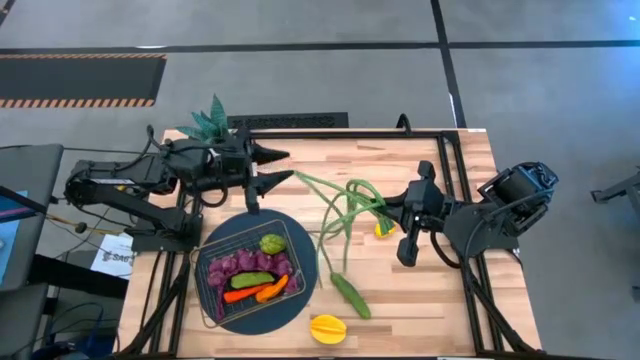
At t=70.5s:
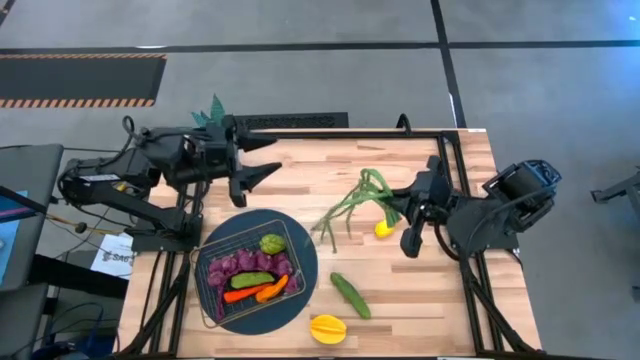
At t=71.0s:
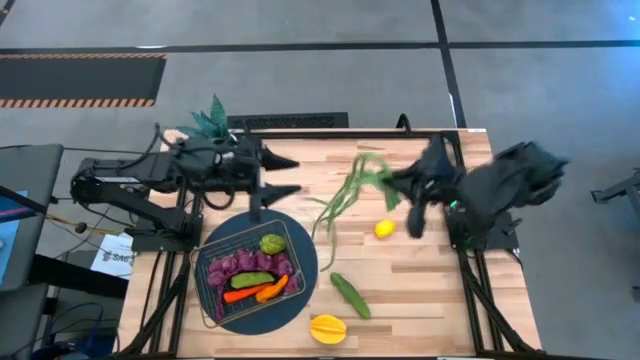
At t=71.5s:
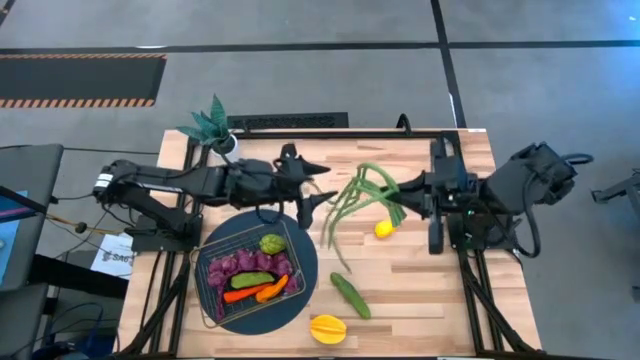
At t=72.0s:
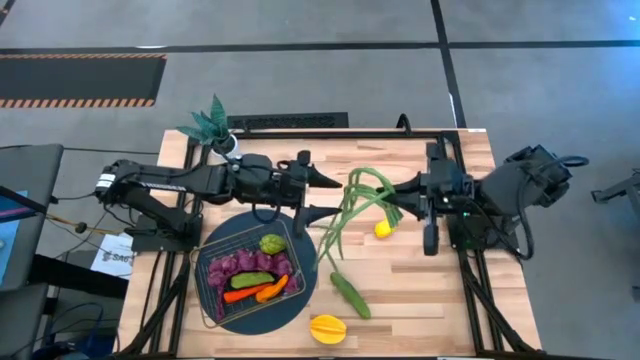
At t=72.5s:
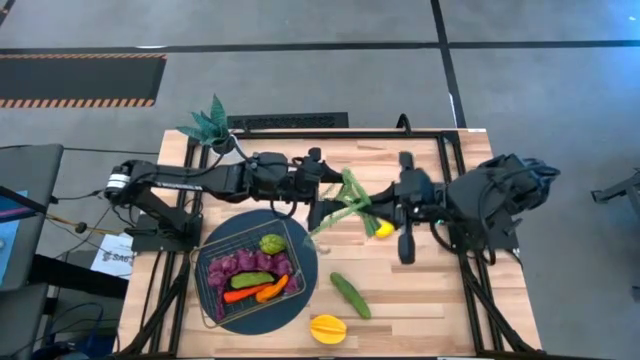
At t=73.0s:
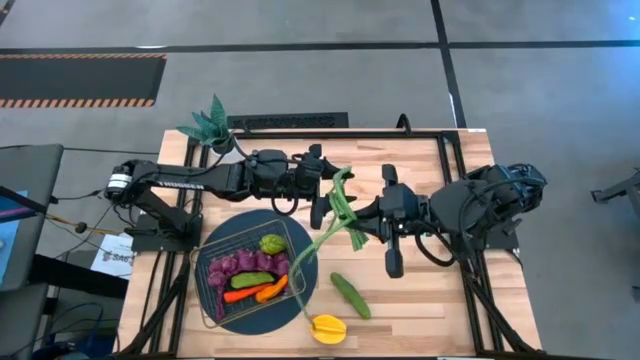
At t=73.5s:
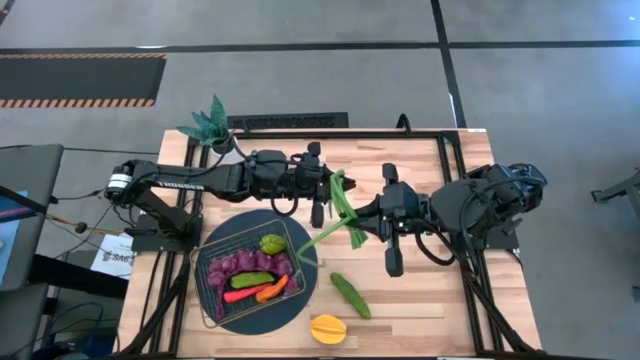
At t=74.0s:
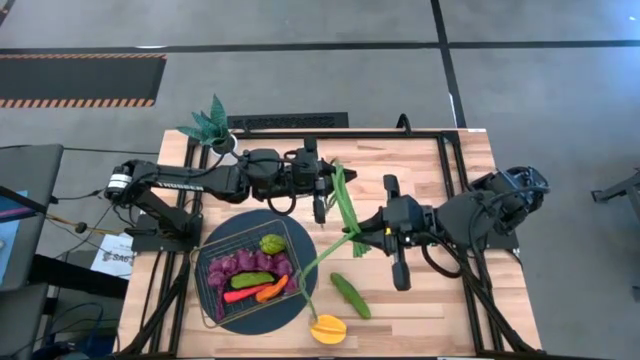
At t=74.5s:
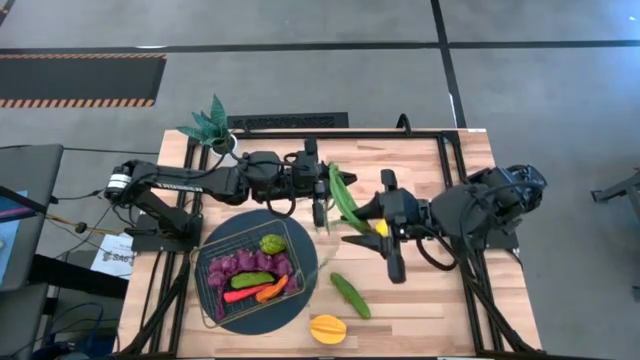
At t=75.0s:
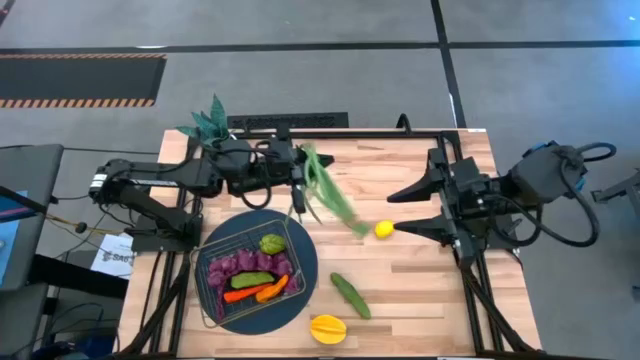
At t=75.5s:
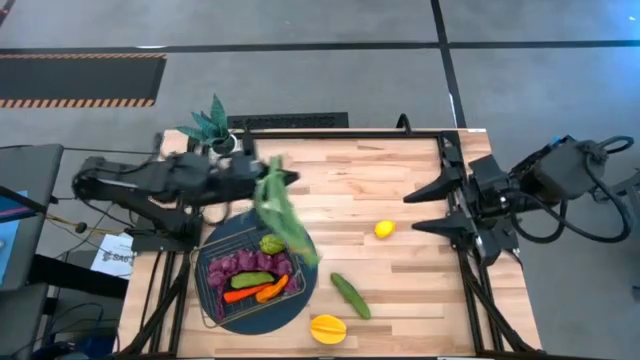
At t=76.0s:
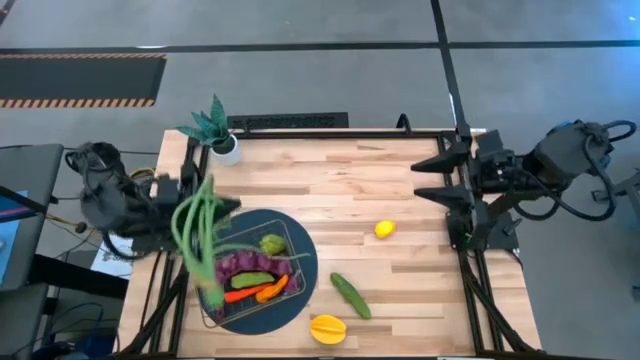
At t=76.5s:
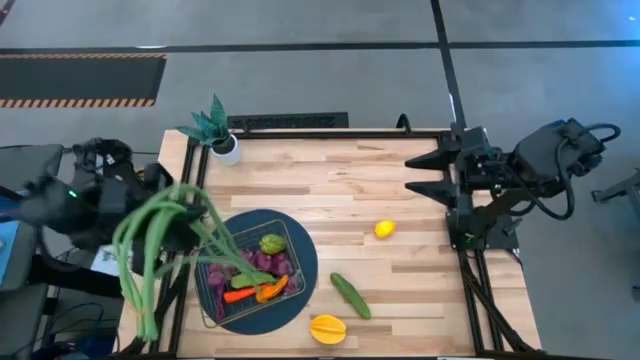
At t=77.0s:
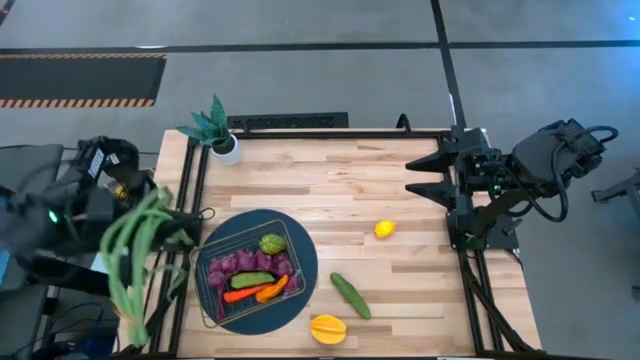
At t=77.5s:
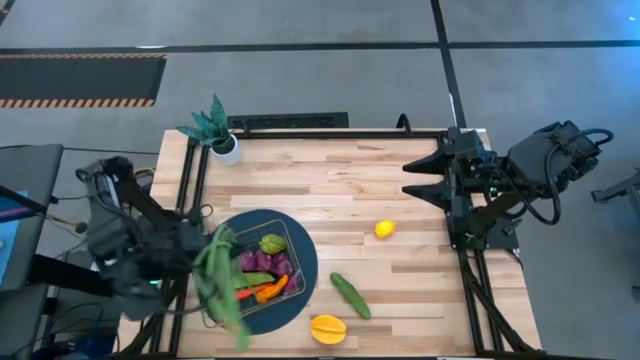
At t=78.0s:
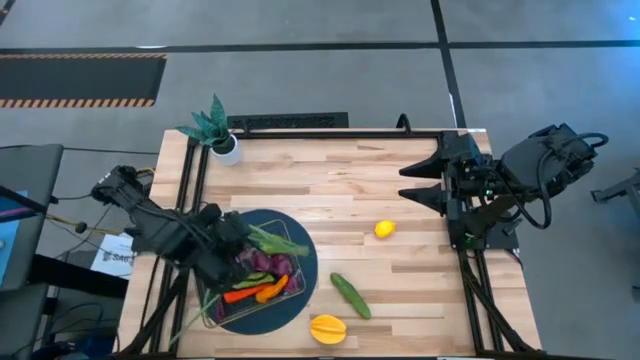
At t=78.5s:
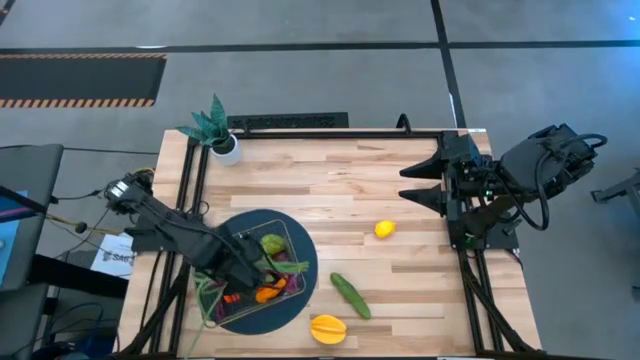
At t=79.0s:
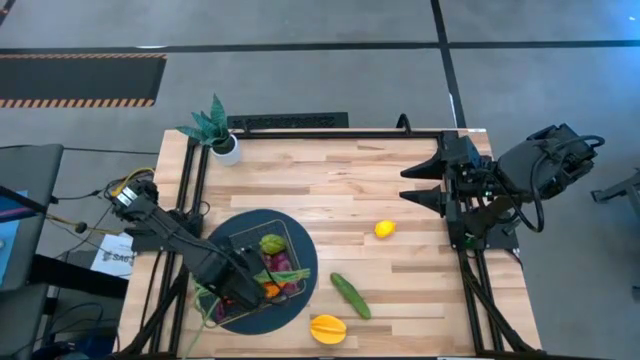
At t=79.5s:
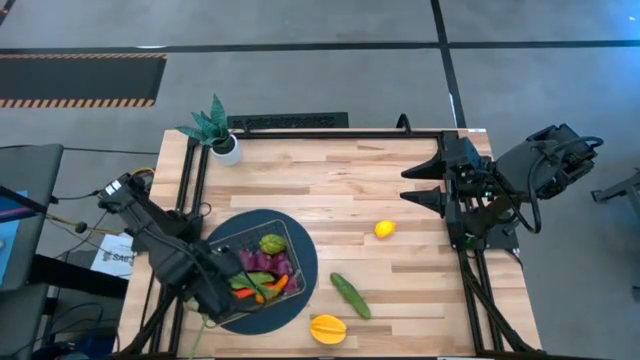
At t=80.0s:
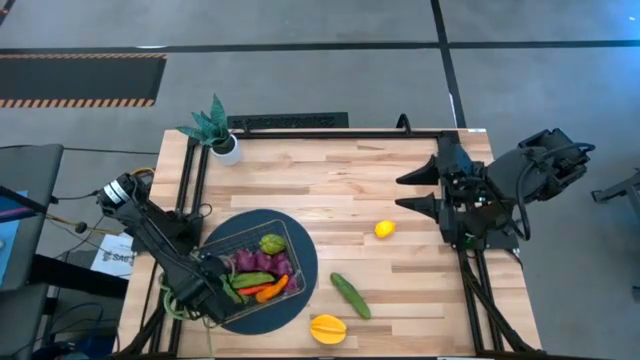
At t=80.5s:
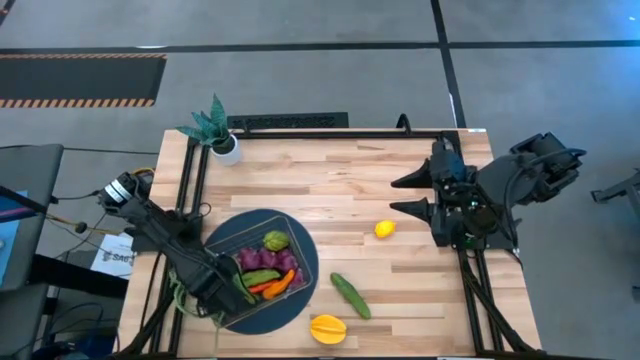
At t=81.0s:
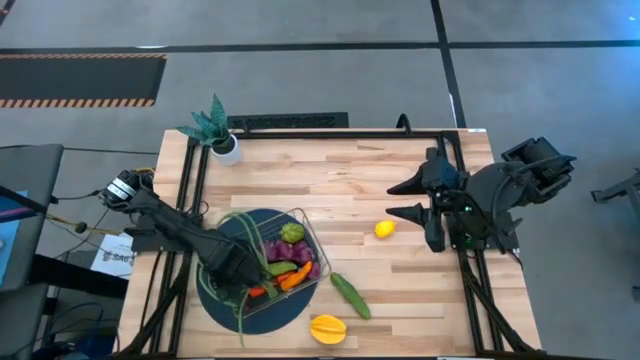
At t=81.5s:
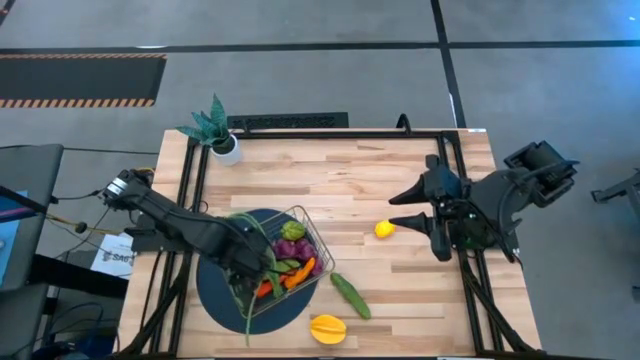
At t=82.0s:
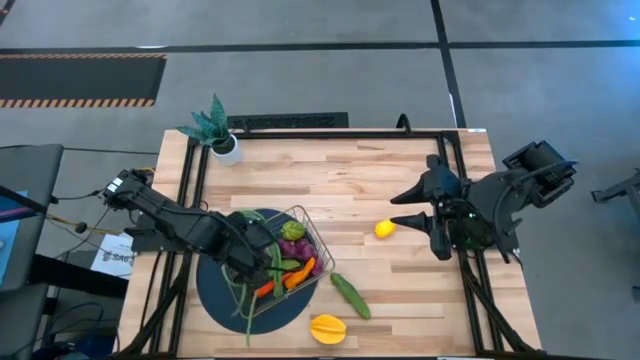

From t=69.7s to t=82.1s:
Task: Build produce basket
Put the bunch of green beans into the wire basket

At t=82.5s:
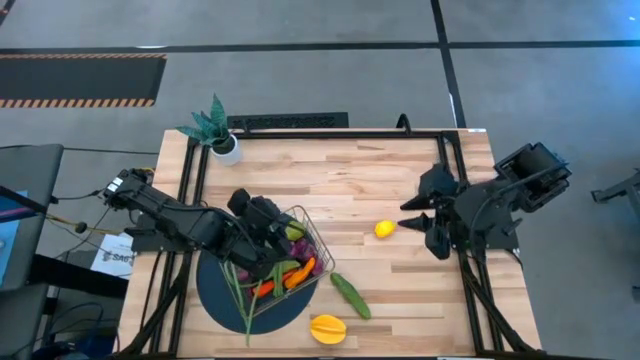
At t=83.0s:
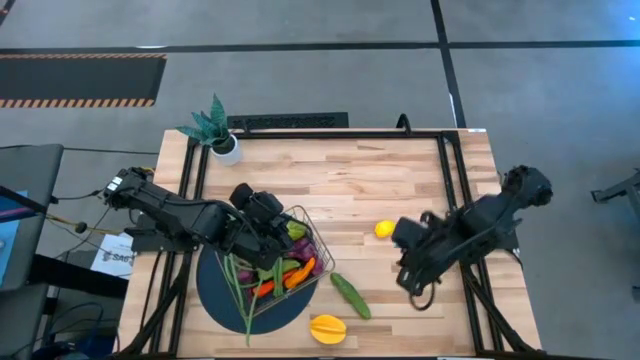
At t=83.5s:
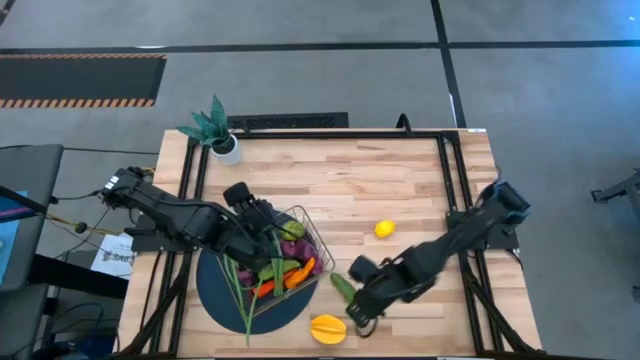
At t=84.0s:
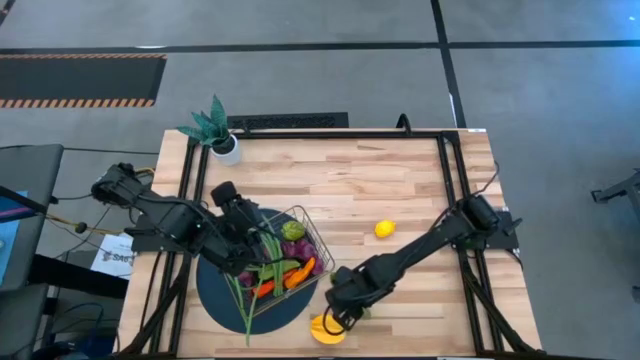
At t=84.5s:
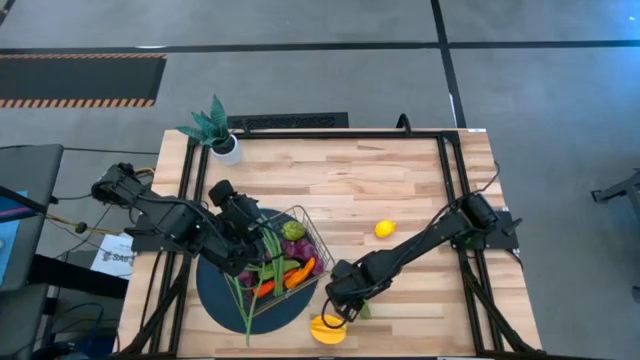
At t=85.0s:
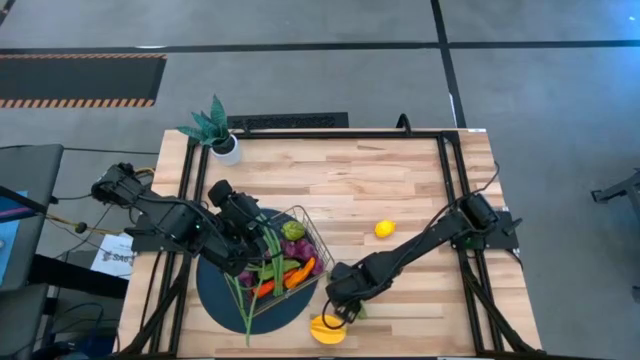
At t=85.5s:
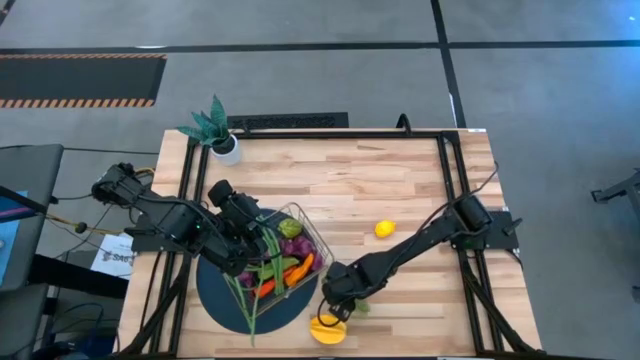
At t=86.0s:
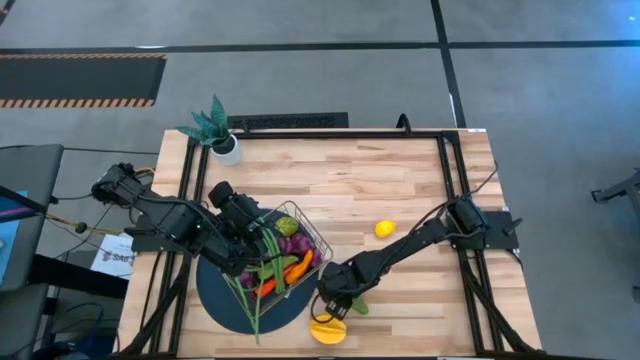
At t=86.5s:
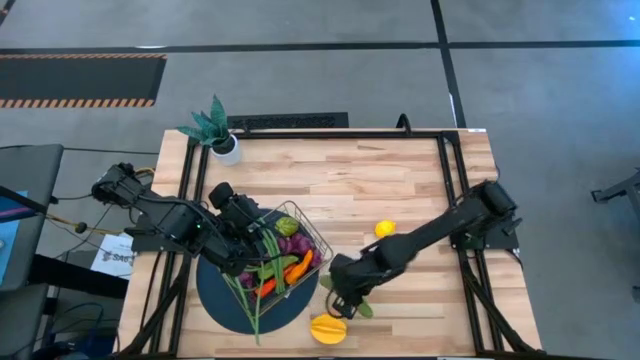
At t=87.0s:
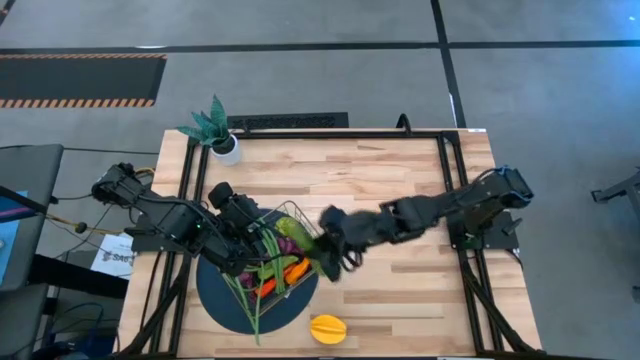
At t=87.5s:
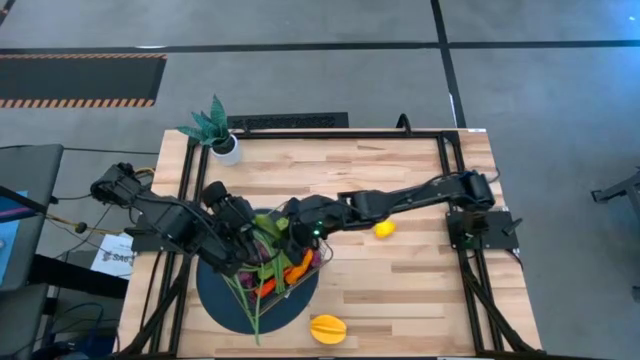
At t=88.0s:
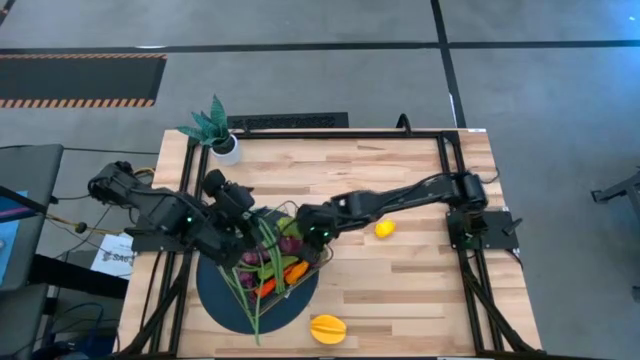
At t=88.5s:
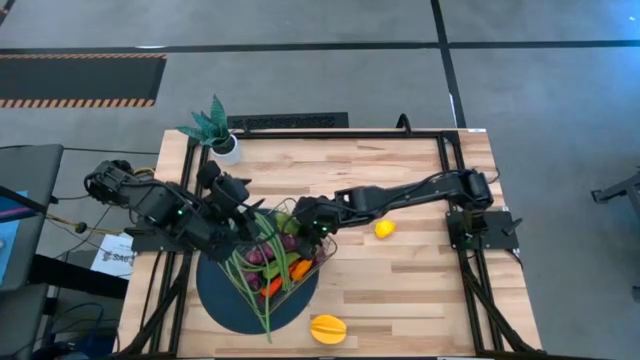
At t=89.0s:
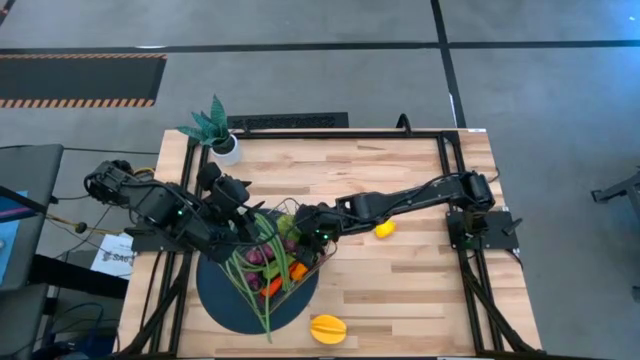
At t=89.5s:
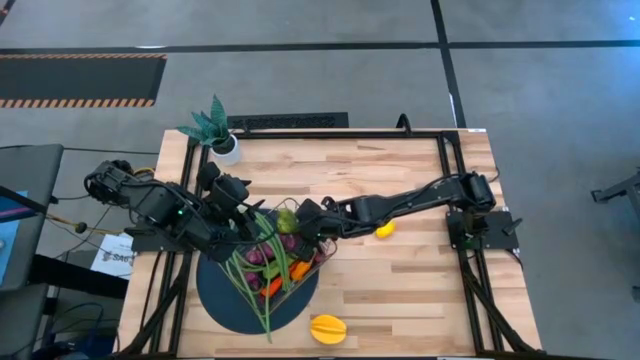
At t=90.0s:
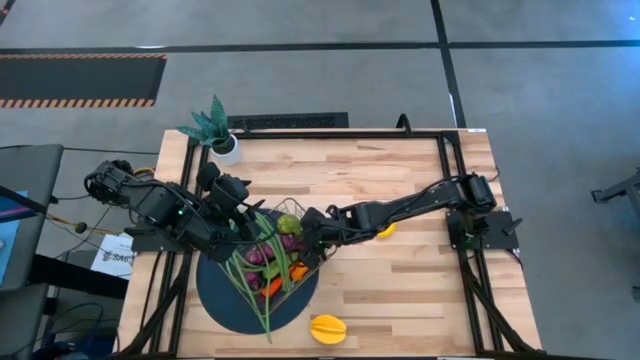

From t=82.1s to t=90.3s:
Put the green cucumber into the wire basket
